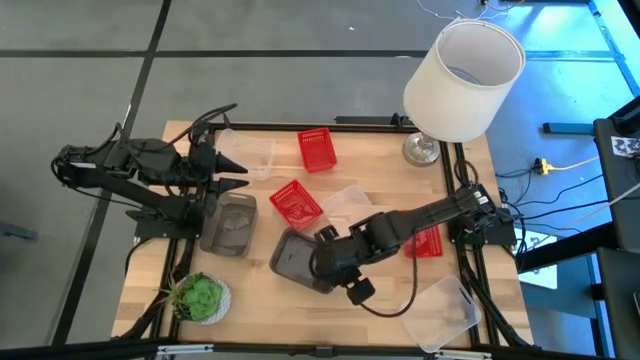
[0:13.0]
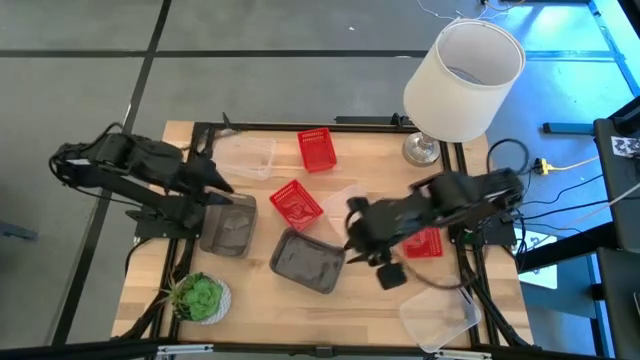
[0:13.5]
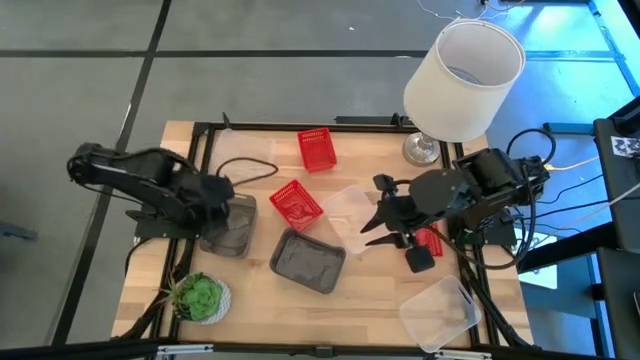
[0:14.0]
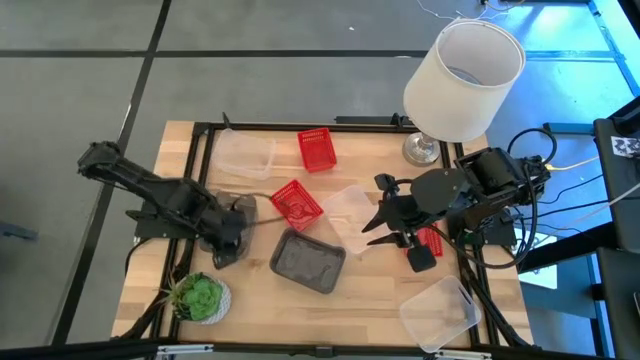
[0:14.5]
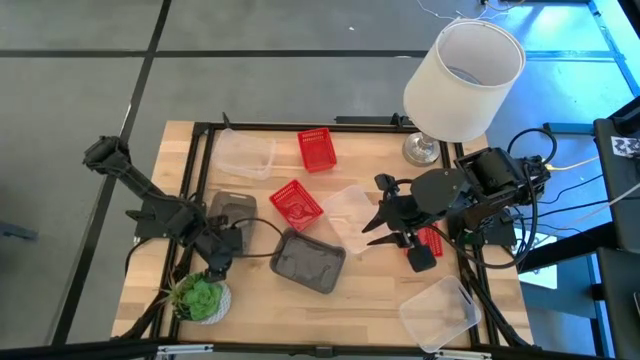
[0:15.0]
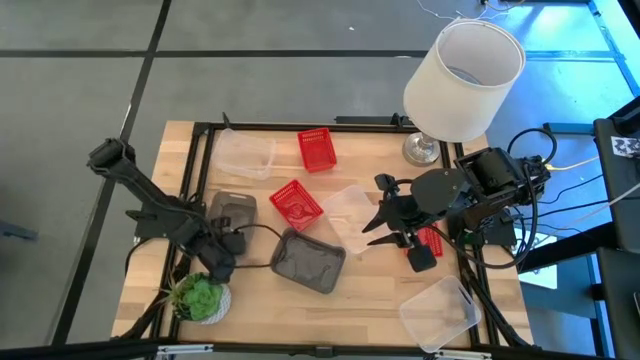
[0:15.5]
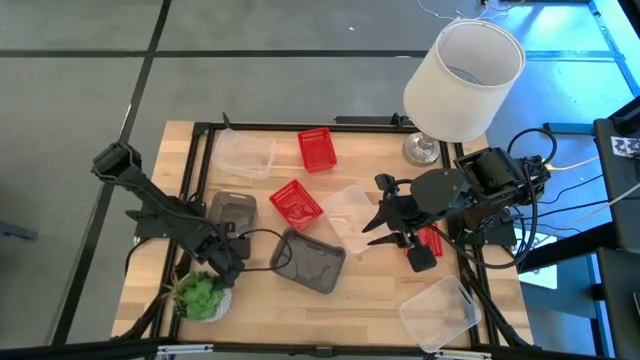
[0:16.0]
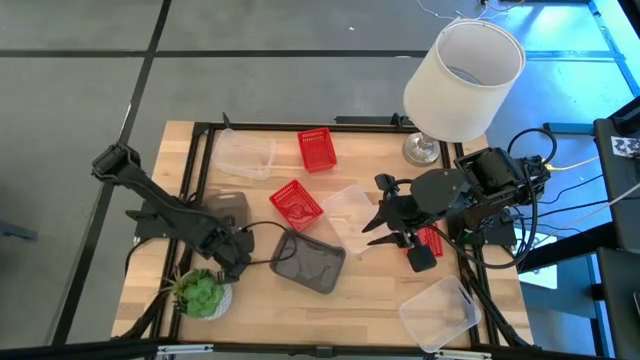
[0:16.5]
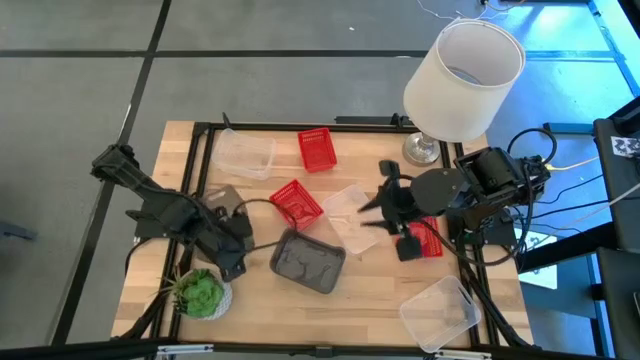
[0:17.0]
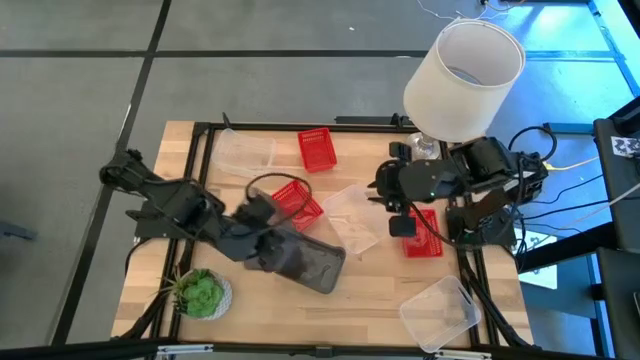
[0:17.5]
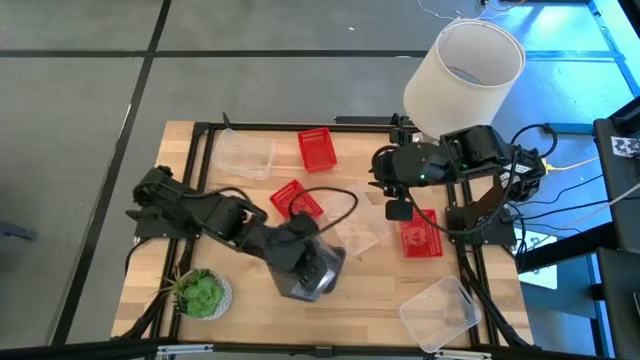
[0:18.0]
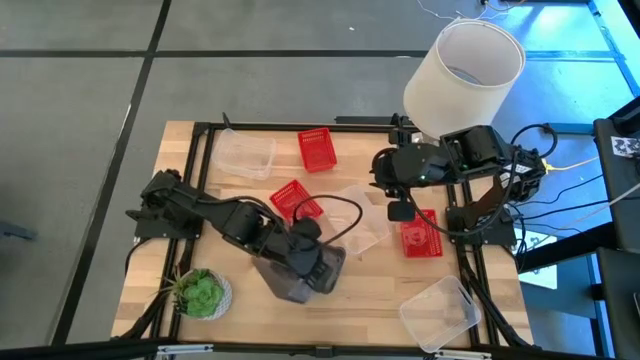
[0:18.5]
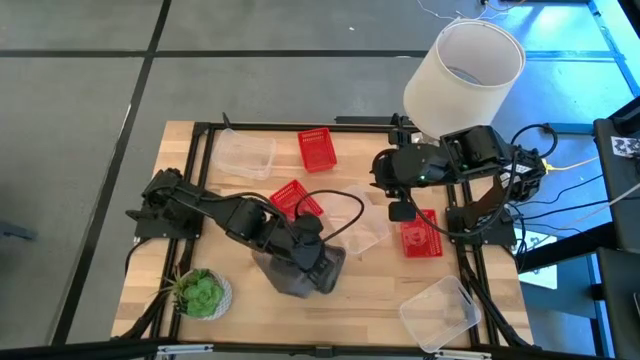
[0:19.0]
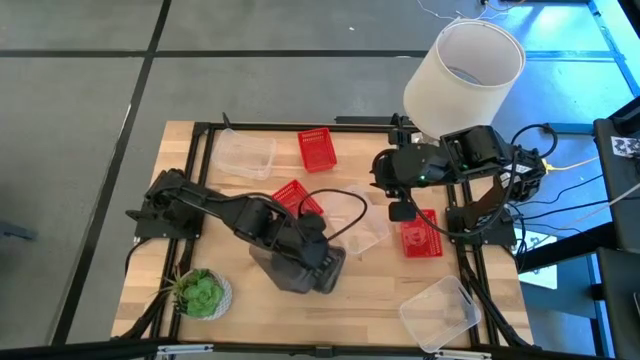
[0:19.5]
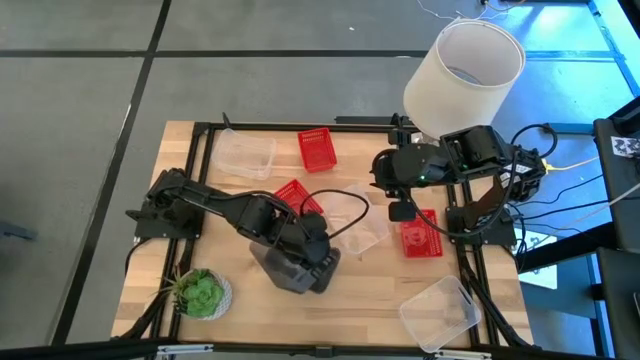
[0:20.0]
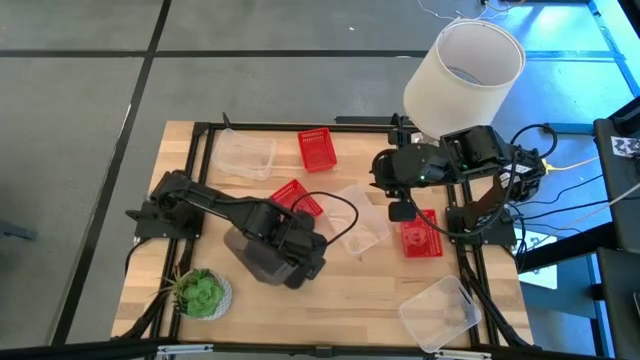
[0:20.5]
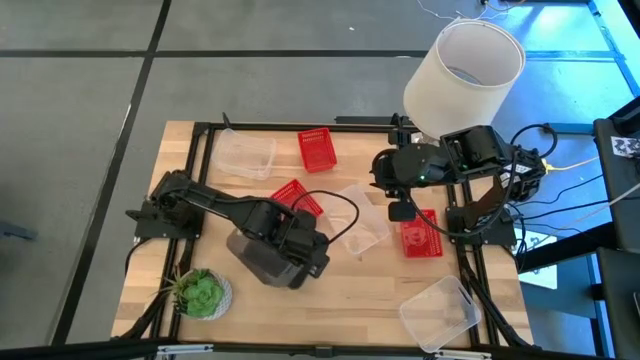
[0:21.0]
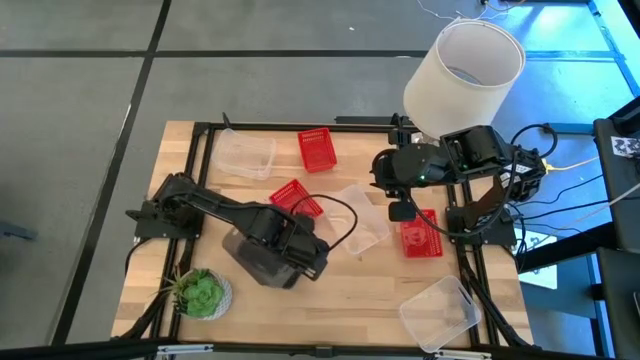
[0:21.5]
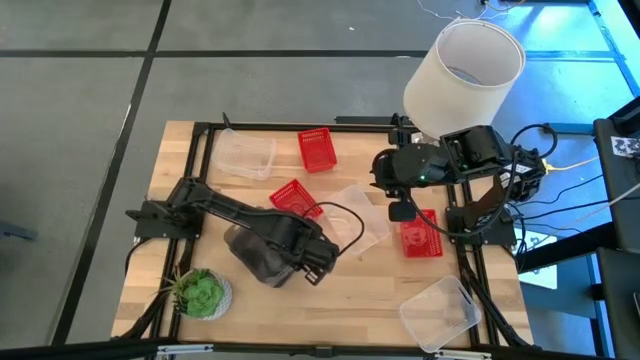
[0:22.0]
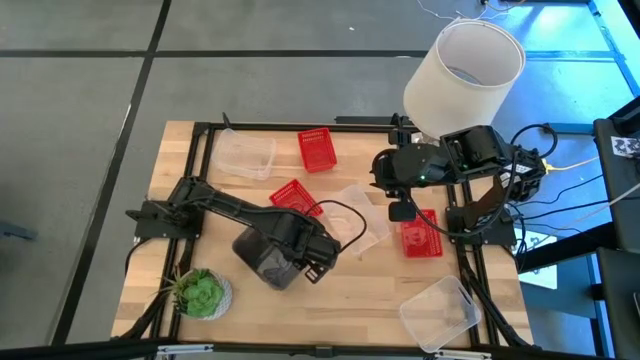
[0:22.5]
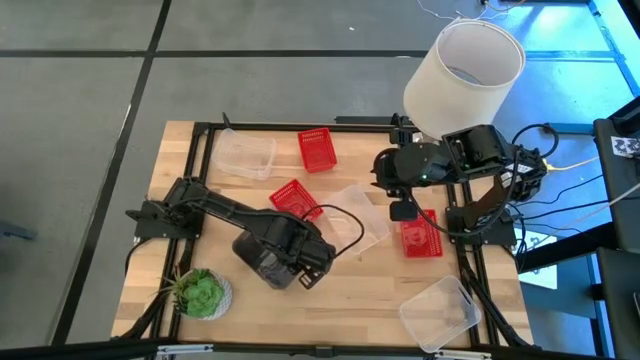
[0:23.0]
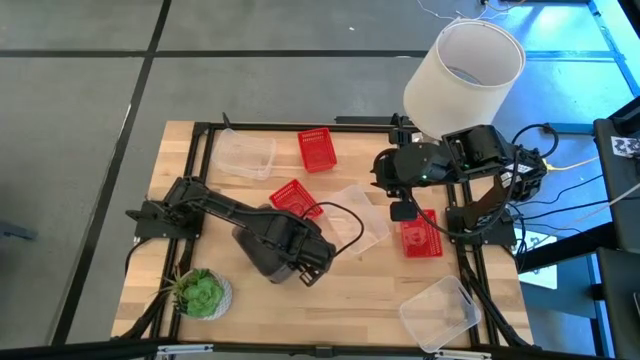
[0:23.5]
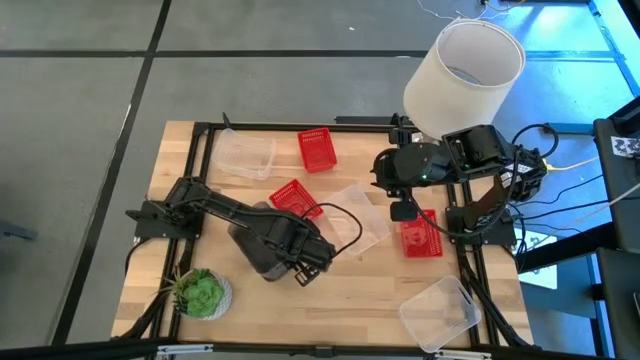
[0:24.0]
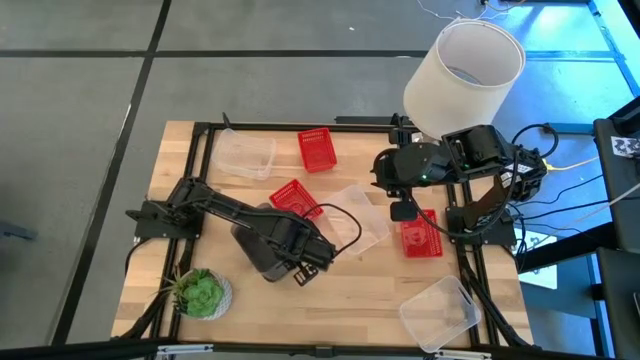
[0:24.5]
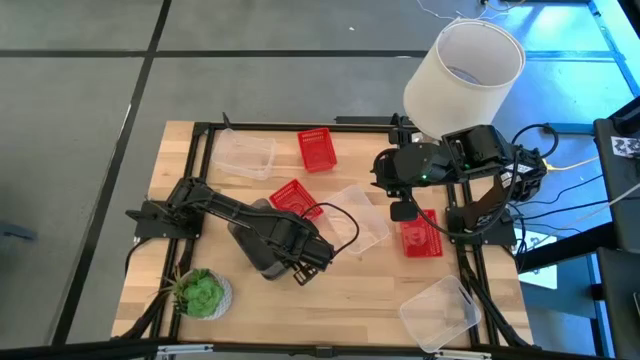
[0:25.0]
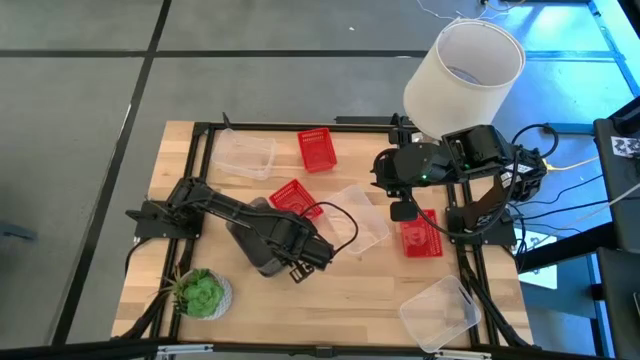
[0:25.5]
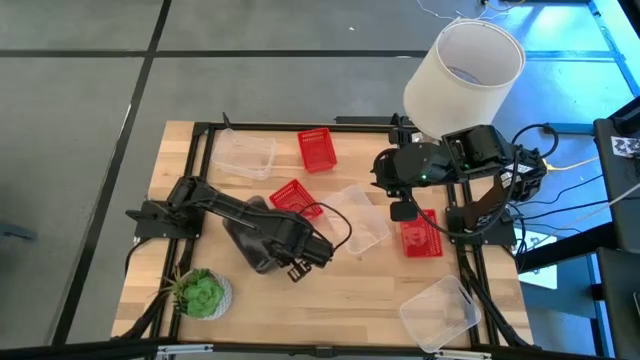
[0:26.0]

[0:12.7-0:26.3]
Stack the left black bin on the stacked black bins
